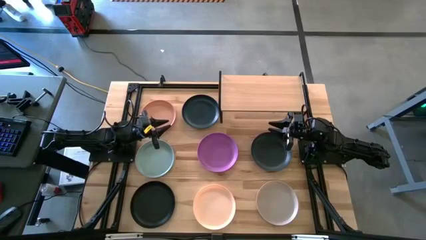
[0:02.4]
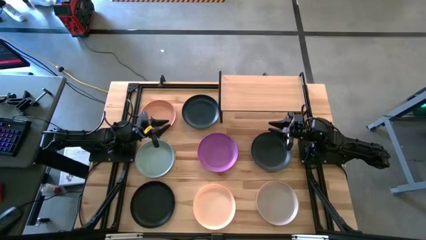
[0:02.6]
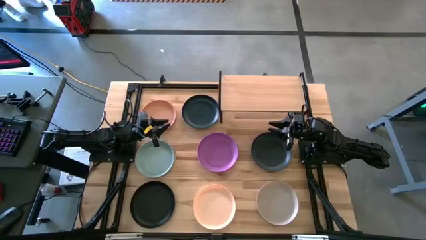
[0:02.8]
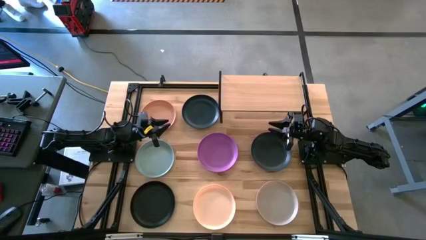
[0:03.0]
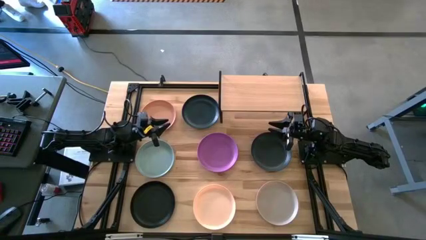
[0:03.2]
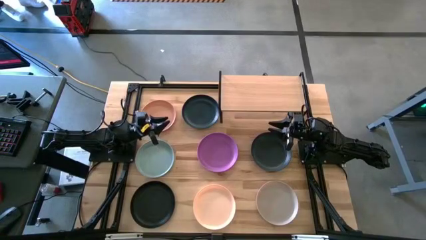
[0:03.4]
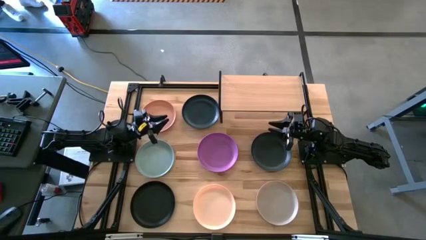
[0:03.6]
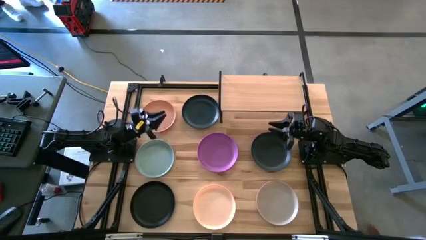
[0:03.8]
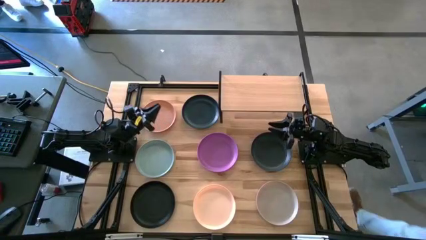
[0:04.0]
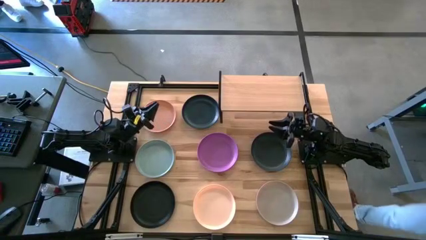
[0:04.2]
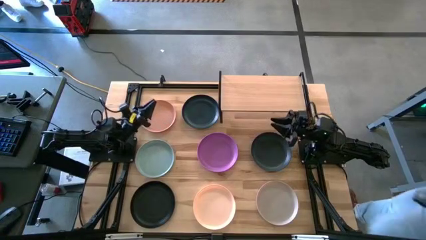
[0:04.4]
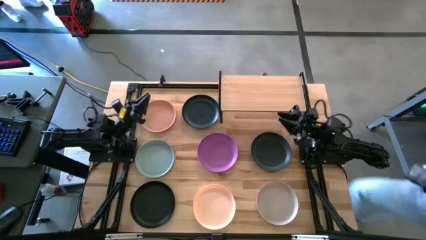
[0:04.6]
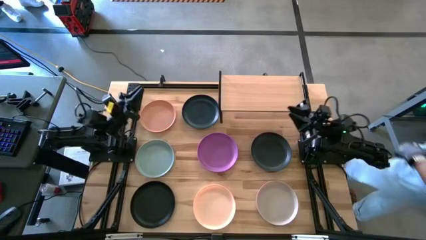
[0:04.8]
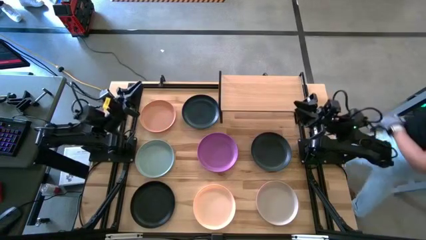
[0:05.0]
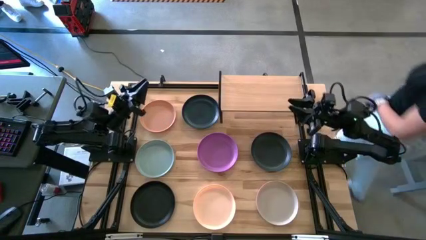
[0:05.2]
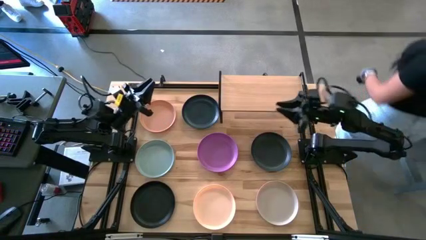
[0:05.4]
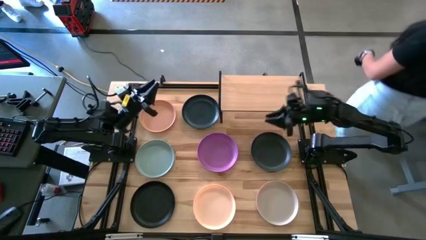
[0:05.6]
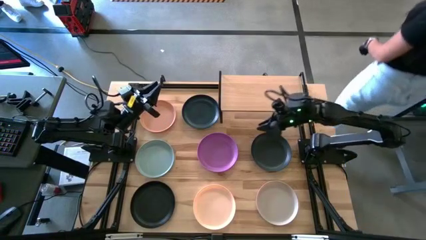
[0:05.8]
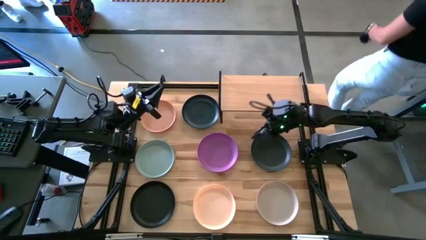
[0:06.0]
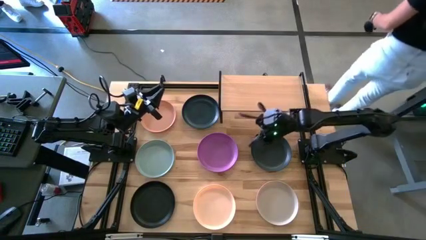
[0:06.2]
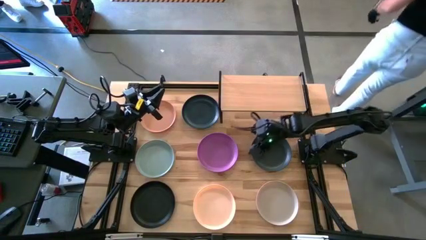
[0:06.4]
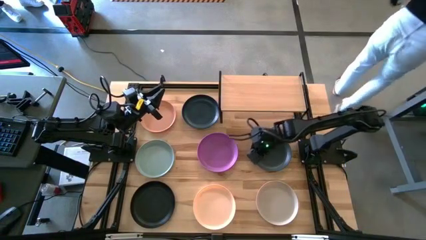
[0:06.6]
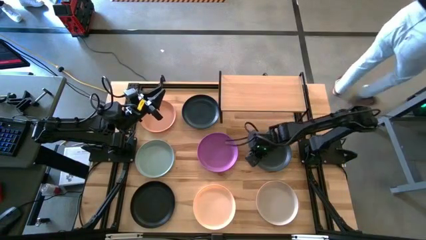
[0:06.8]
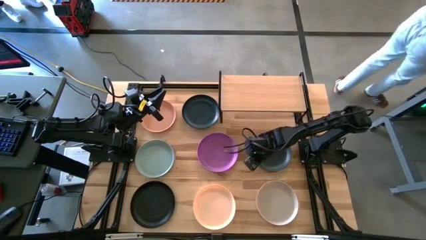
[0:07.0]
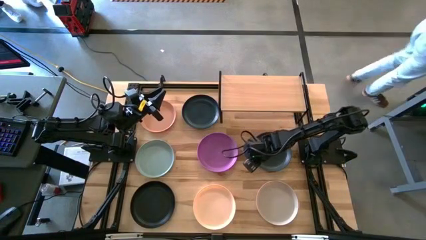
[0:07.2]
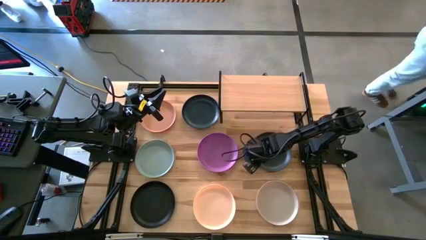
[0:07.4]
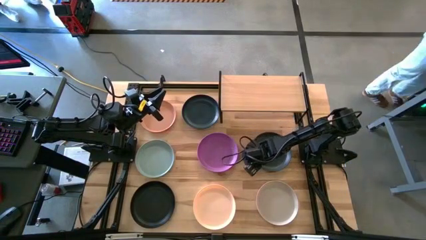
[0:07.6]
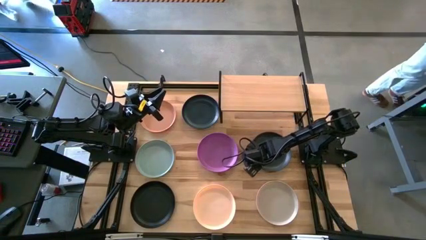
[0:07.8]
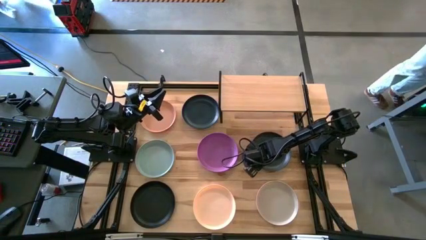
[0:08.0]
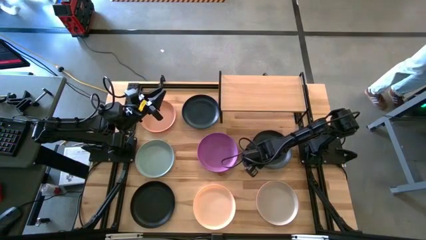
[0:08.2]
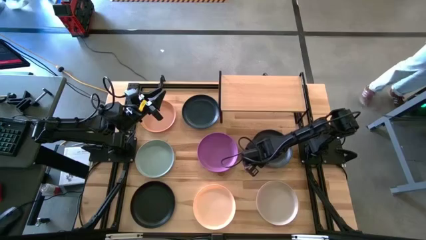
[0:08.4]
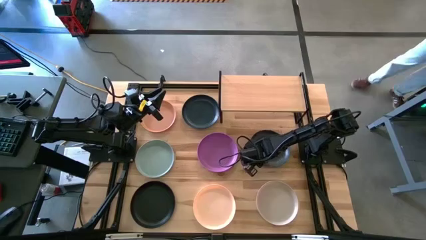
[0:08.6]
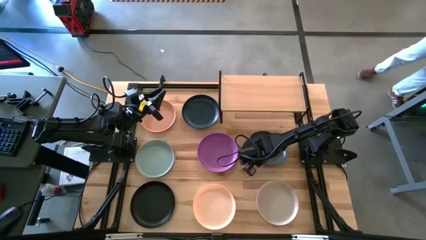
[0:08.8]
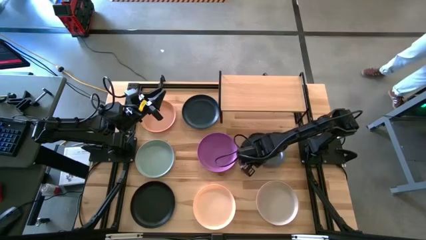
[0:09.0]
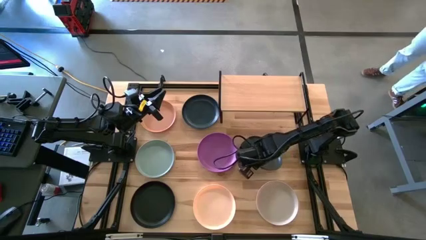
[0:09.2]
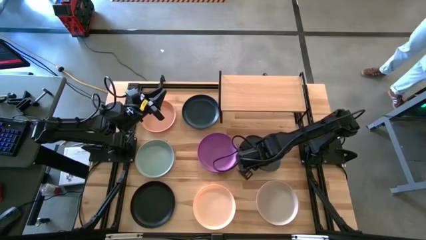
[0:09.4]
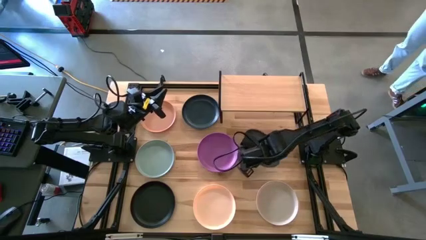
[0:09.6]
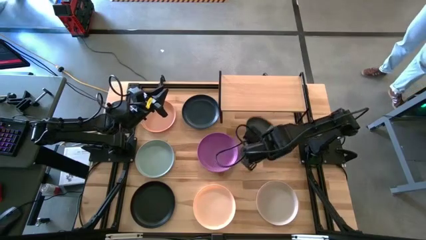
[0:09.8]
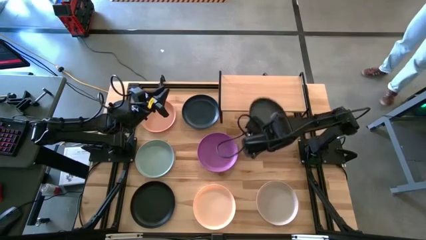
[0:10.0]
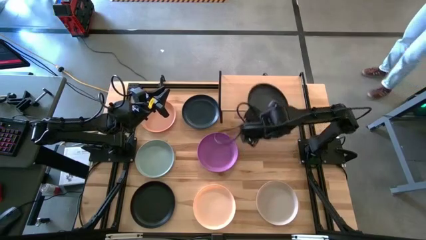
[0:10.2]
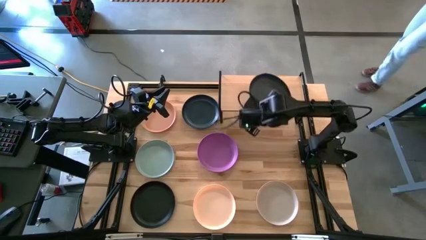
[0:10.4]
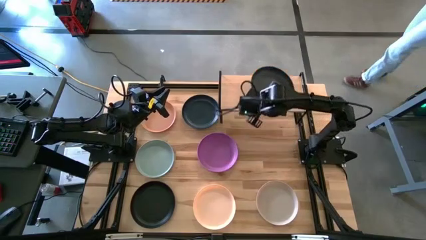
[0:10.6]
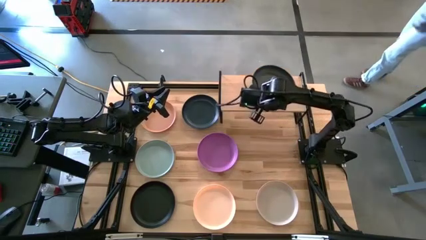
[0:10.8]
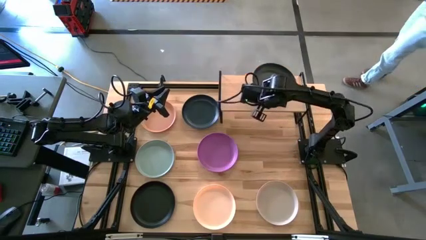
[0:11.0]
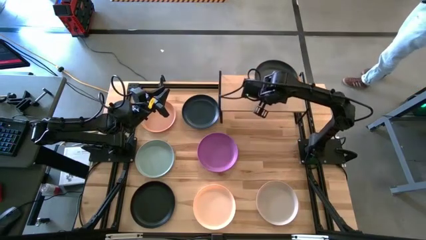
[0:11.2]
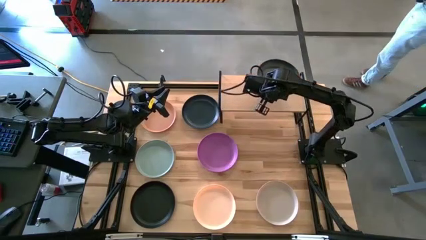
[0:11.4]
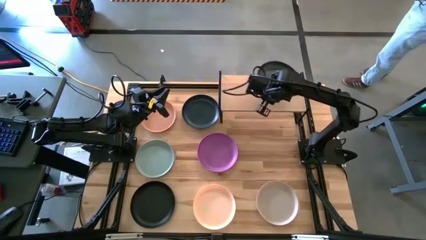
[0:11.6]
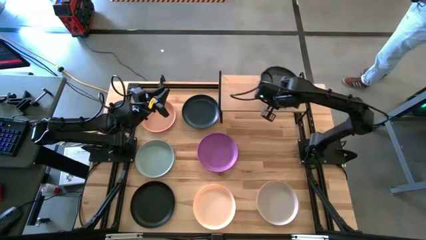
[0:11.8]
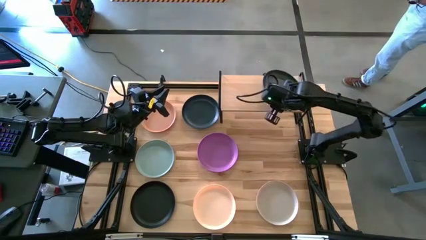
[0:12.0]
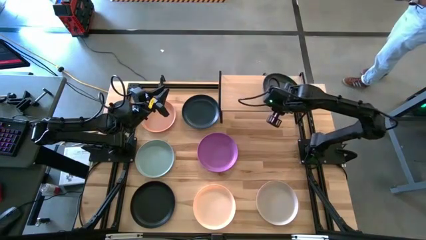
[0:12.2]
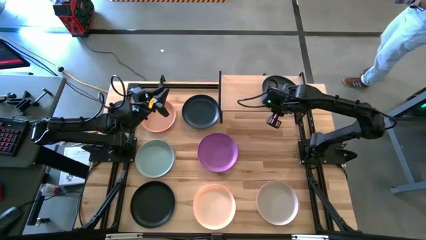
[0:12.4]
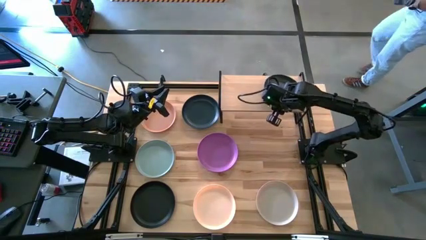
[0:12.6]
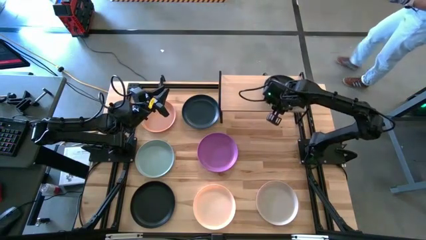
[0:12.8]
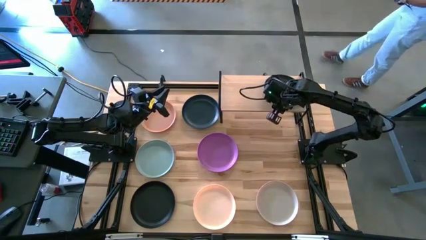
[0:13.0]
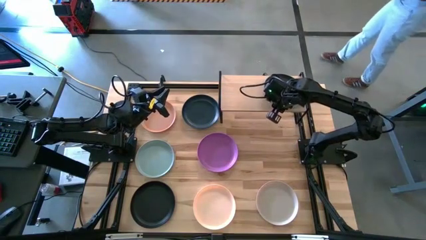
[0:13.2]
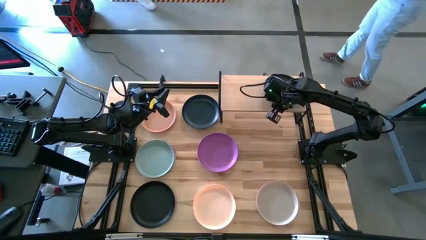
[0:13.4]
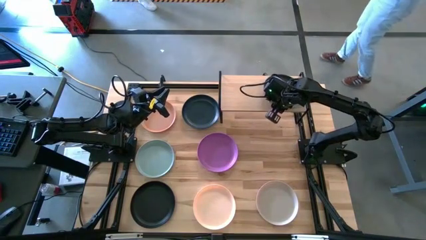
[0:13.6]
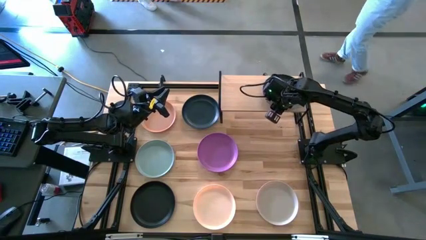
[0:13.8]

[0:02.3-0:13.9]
Task: Place and stack plates onto a shelf
Put the right black plate on the shelf
